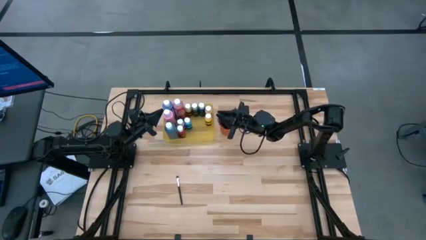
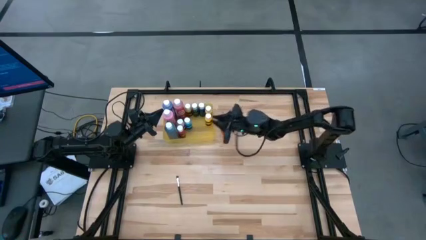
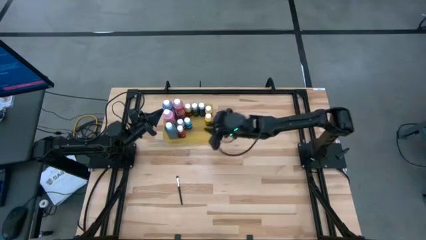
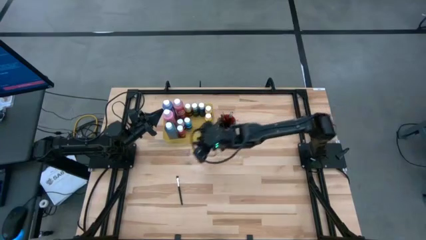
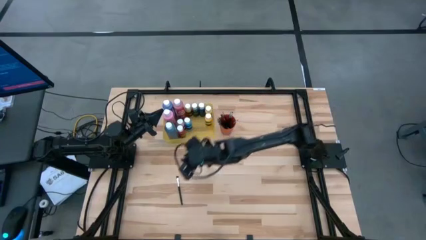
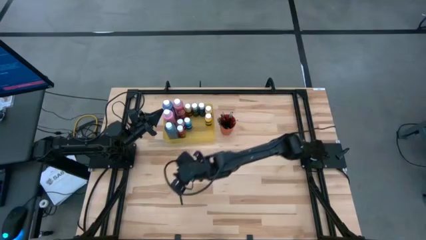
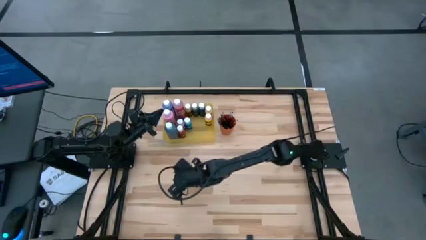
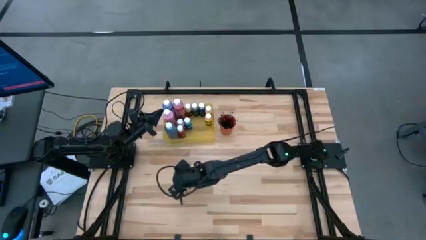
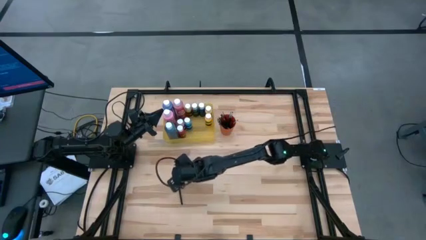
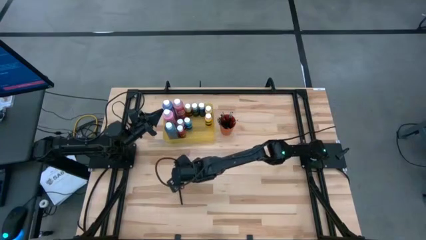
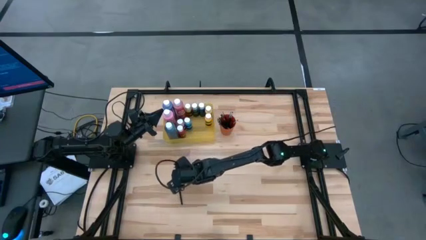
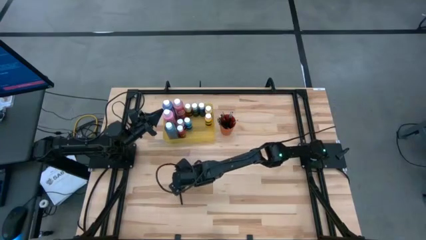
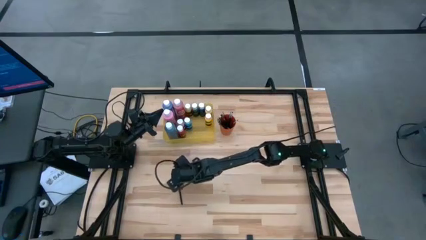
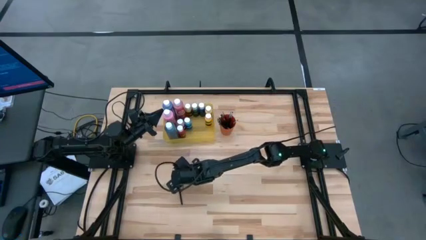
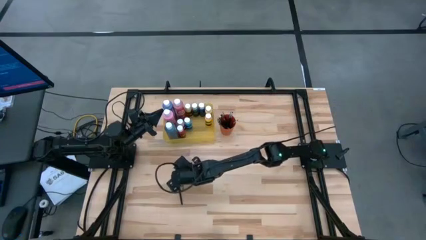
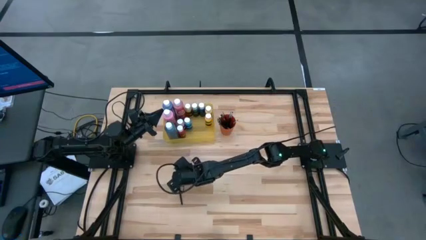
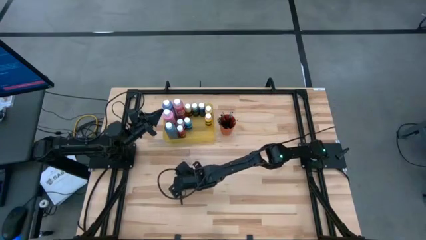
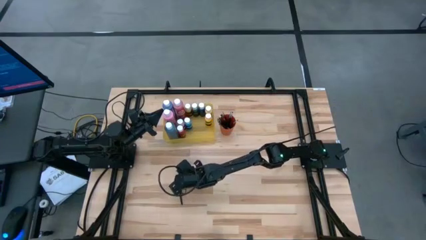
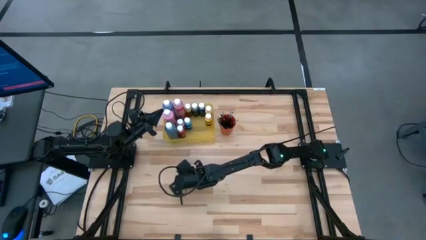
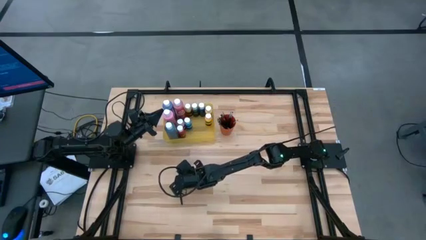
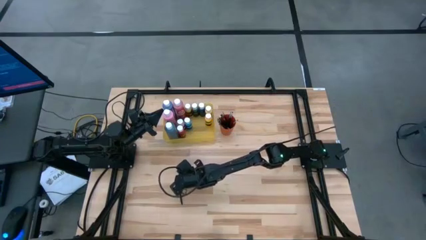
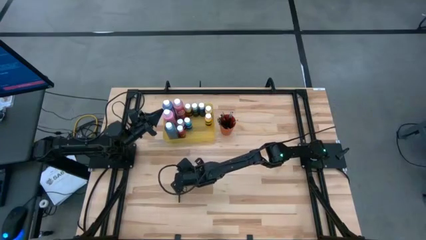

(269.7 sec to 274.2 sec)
Task: Pick & Place Paint Supplies
Put the silver paint brush into the orange cup

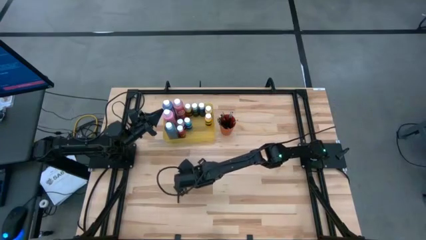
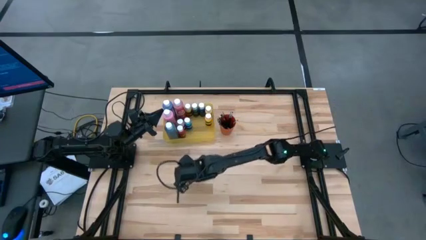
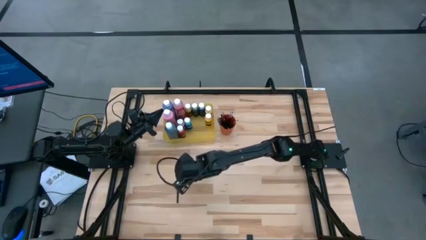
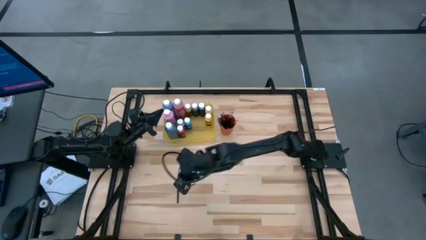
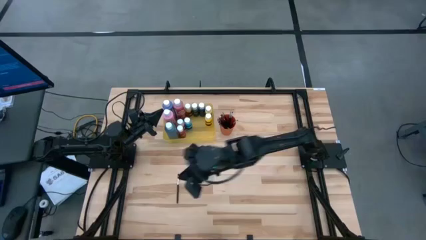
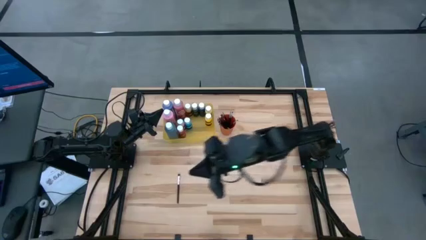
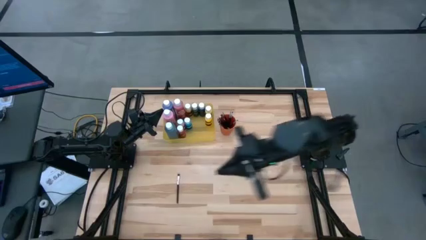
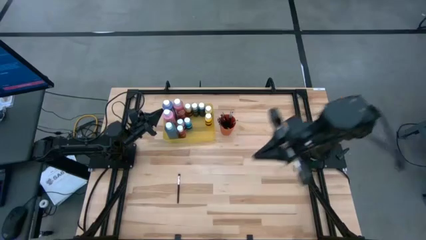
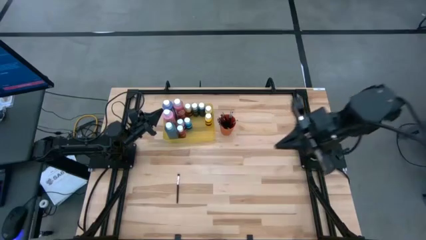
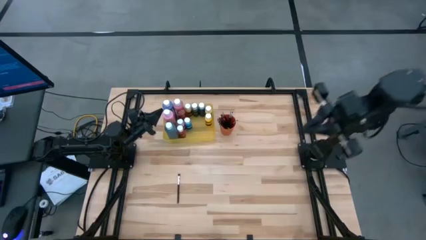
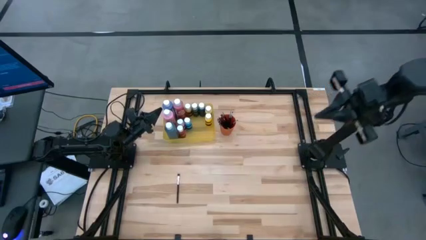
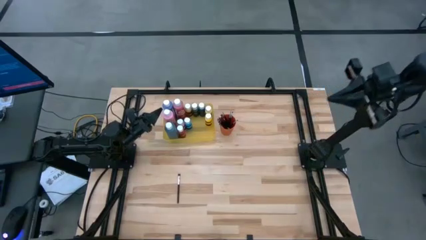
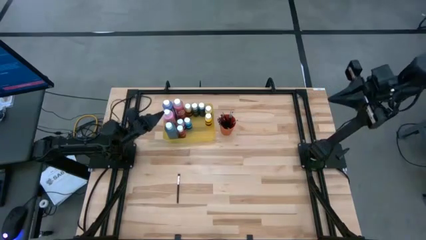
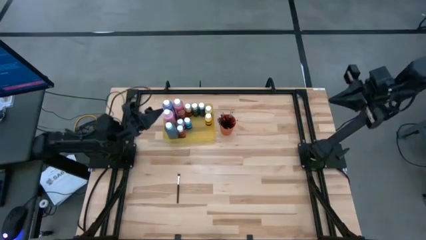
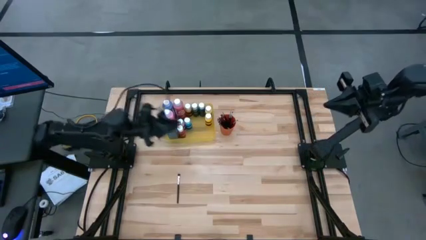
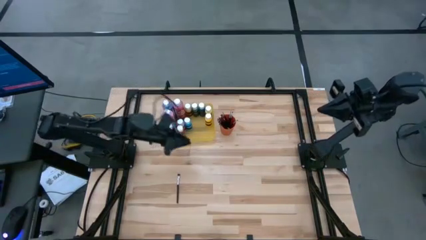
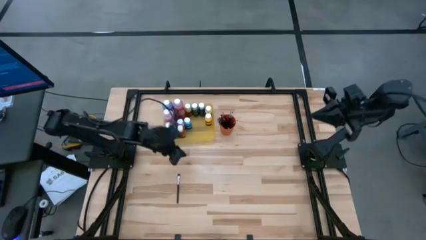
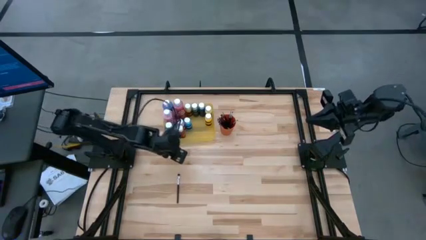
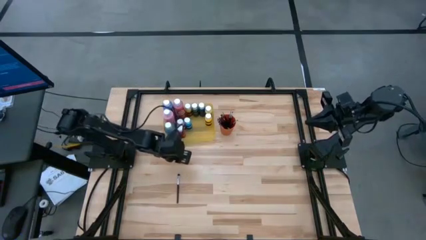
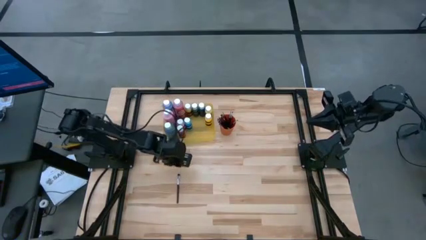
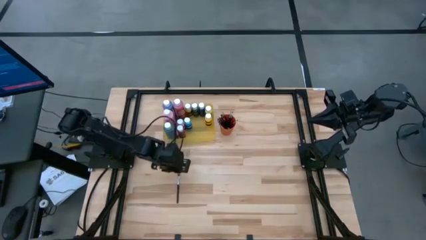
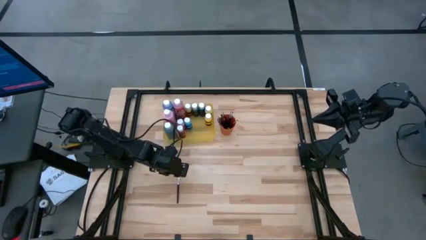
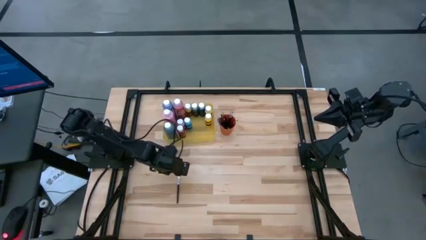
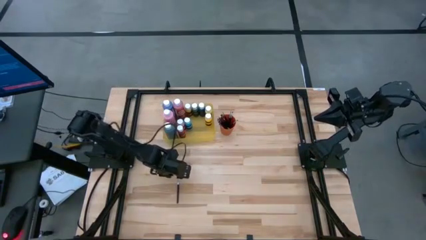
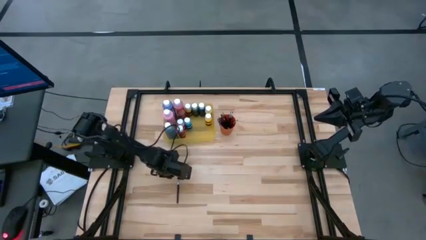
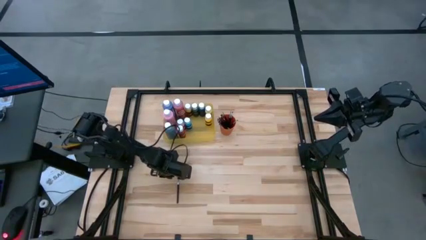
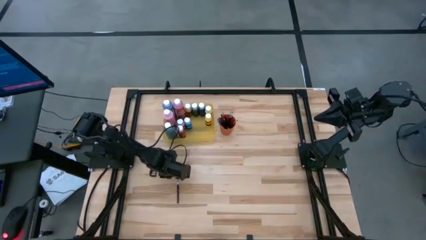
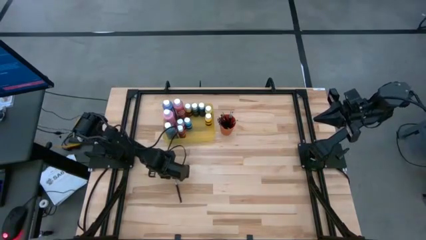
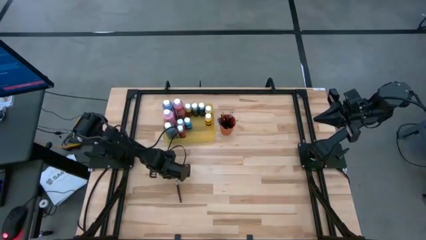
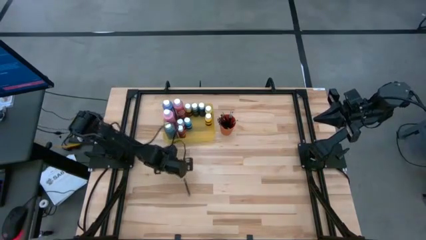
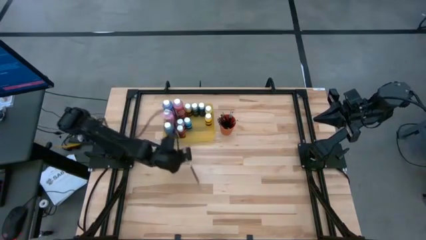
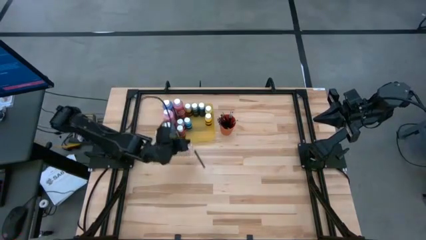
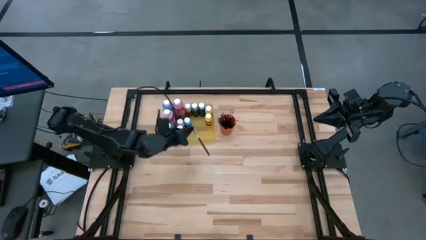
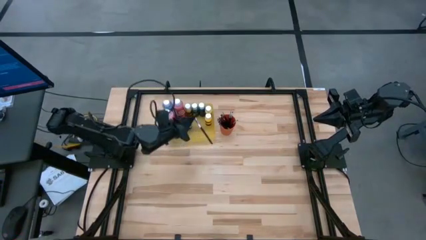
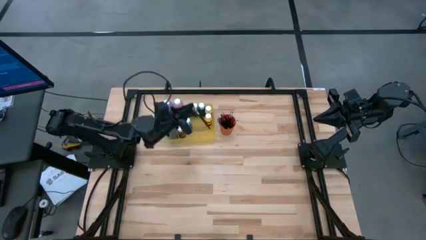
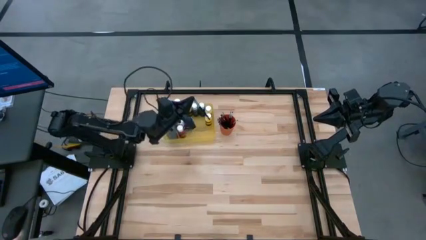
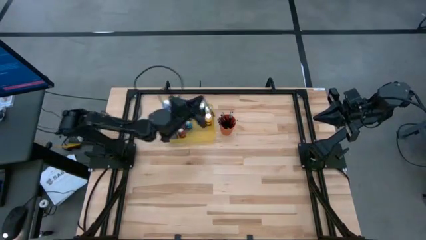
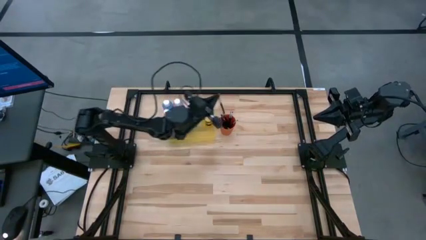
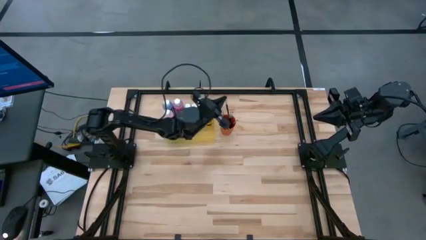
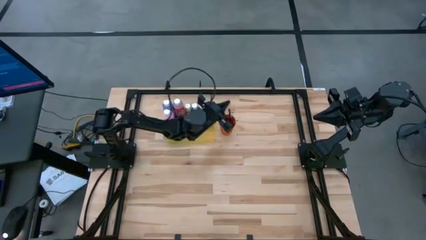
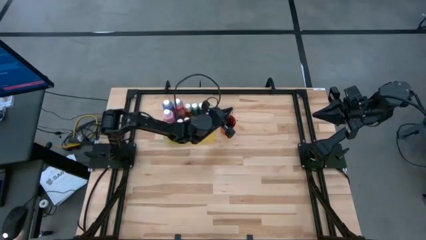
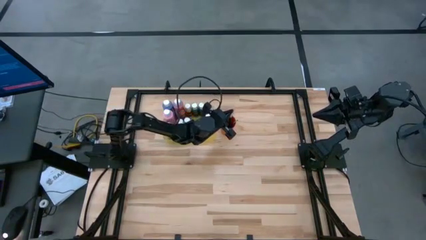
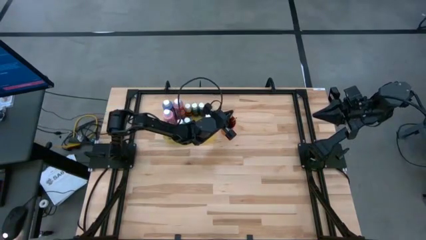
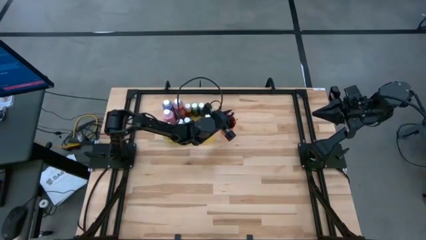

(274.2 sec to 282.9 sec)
Put the silver paint brush into the orange cup

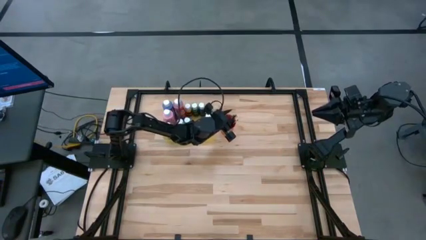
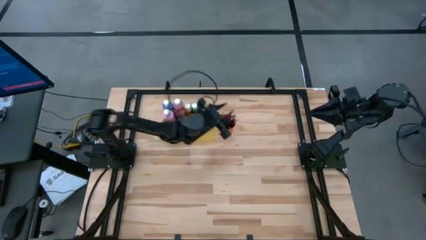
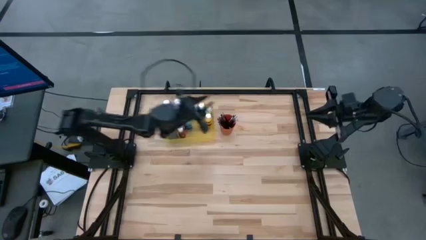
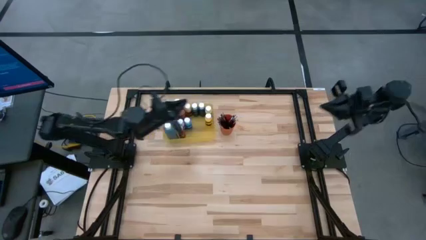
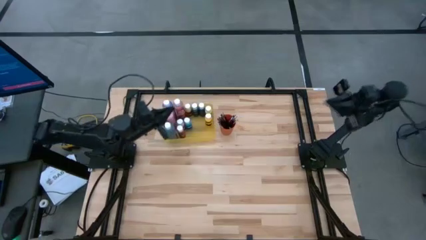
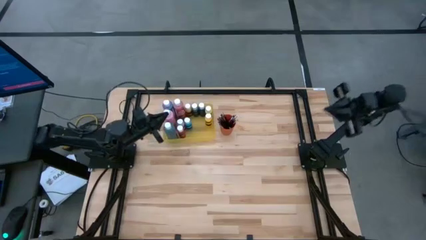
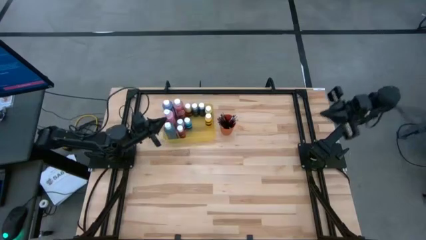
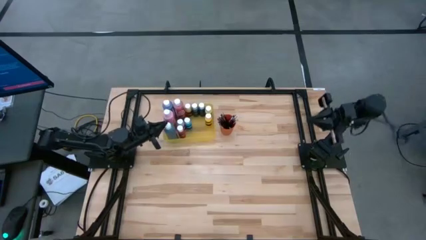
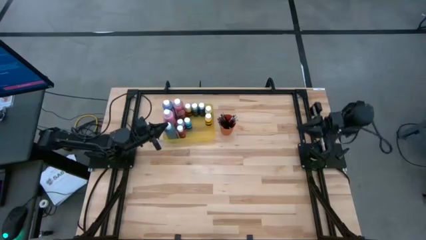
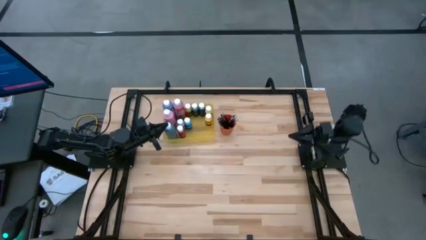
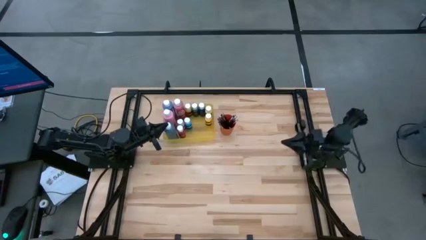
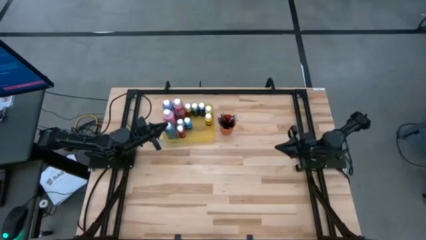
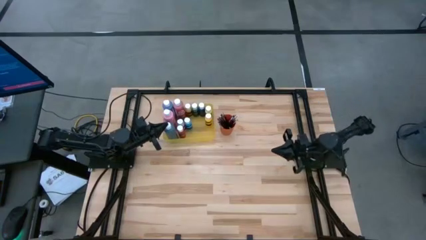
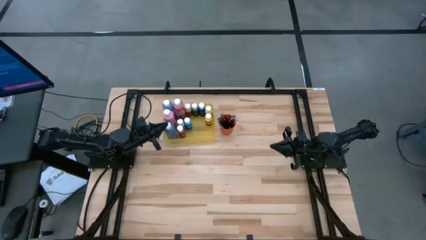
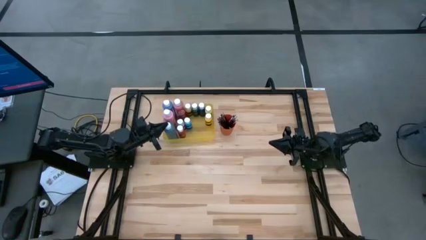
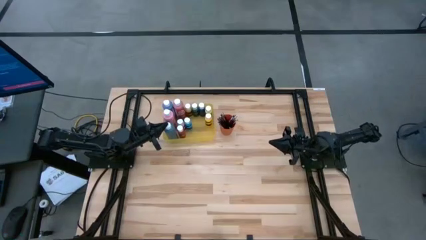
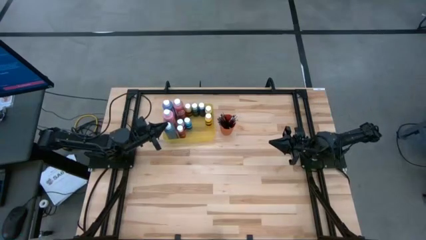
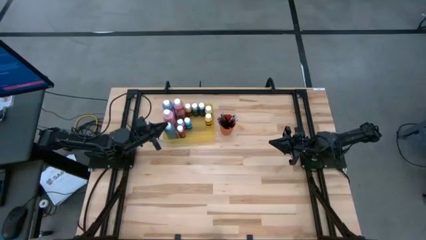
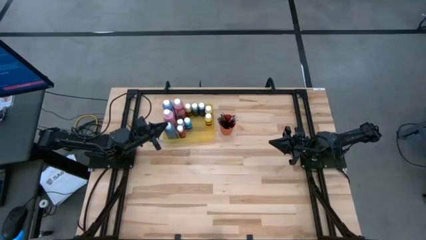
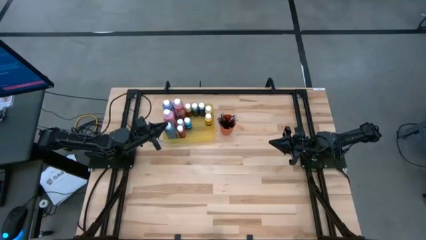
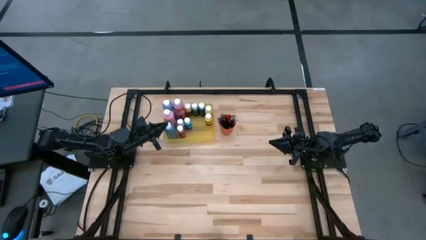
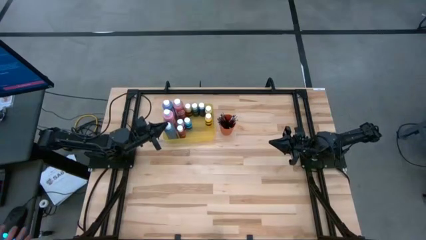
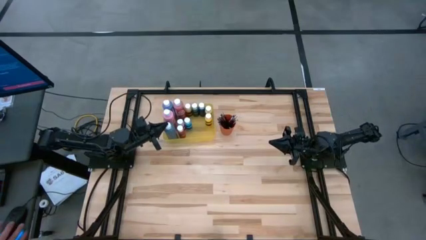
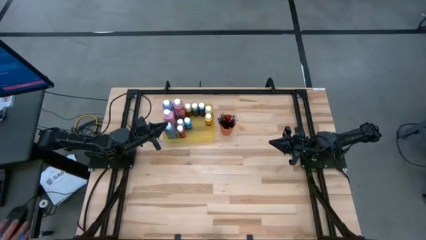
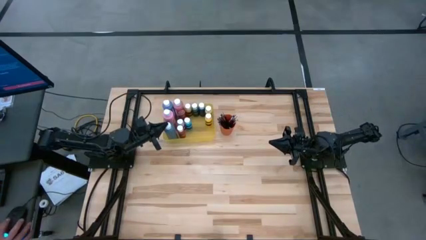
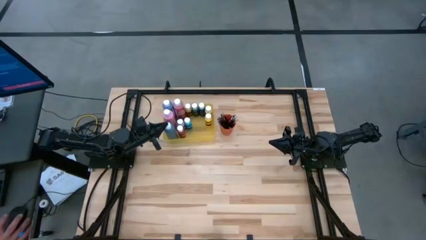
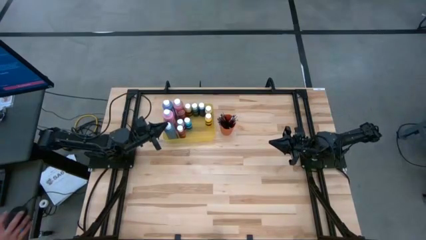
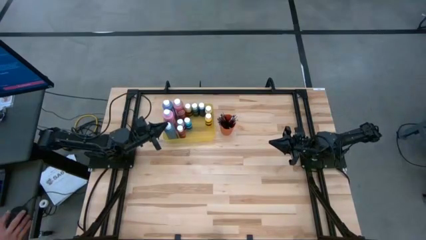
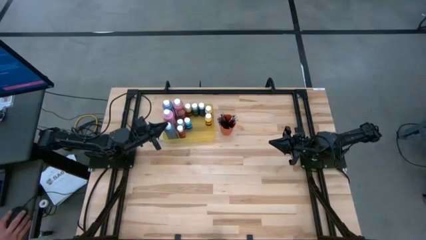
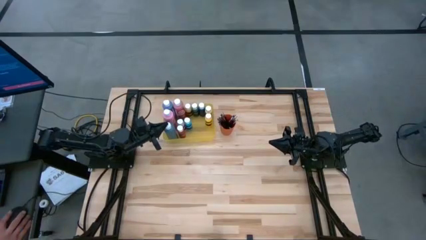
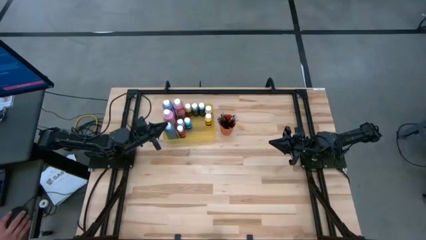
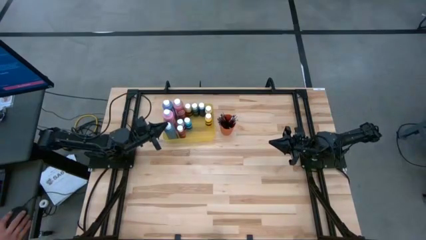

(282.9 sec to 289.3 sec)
Return to Home Position
